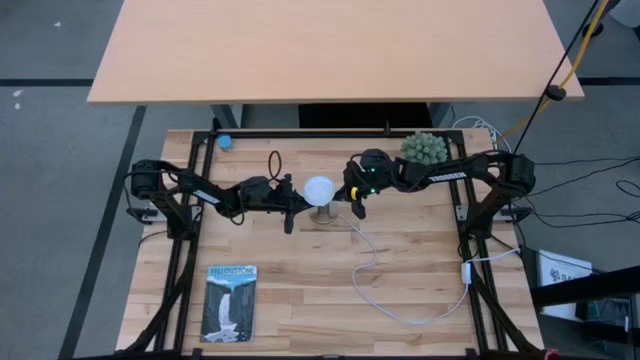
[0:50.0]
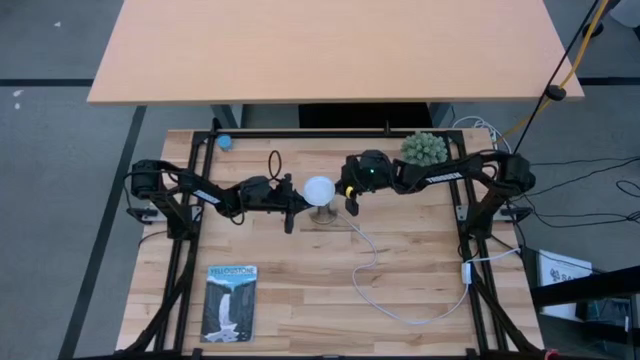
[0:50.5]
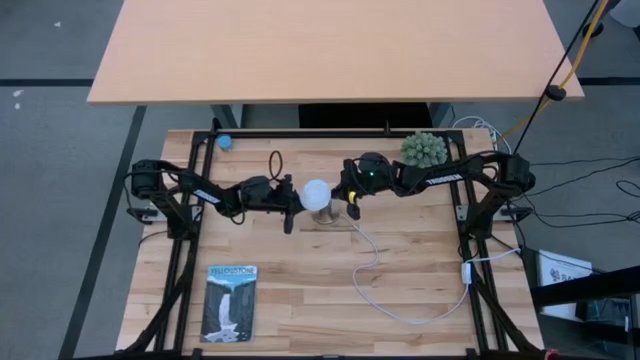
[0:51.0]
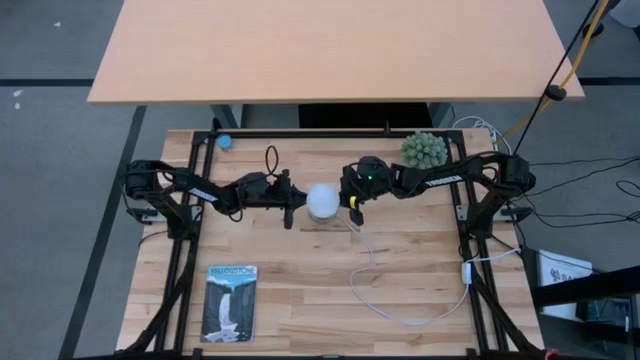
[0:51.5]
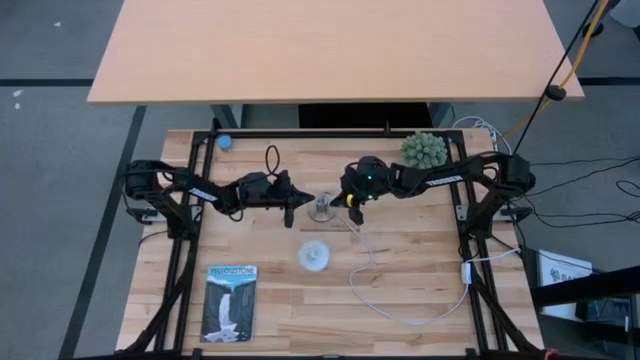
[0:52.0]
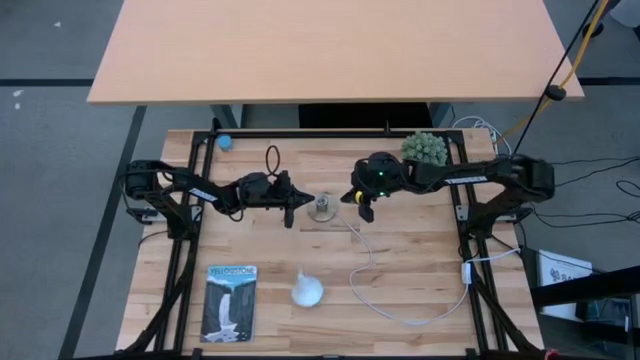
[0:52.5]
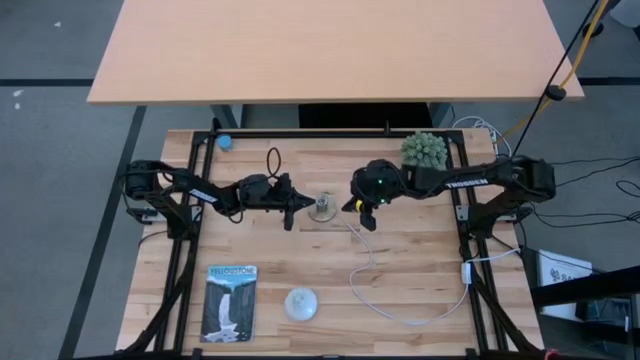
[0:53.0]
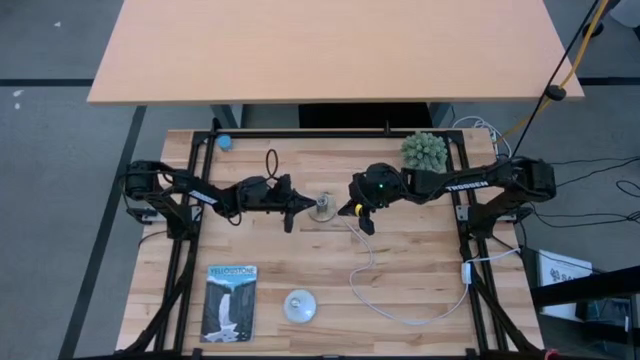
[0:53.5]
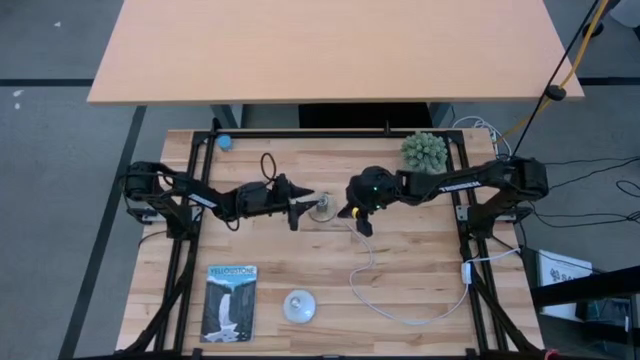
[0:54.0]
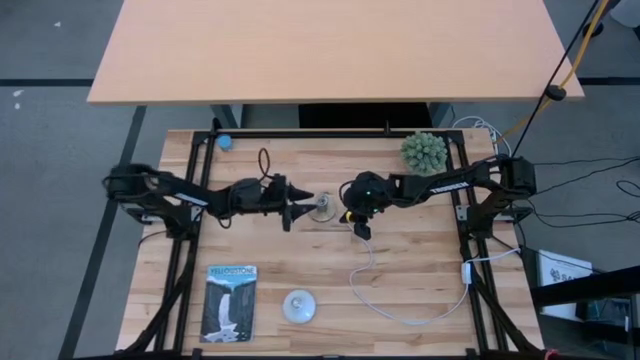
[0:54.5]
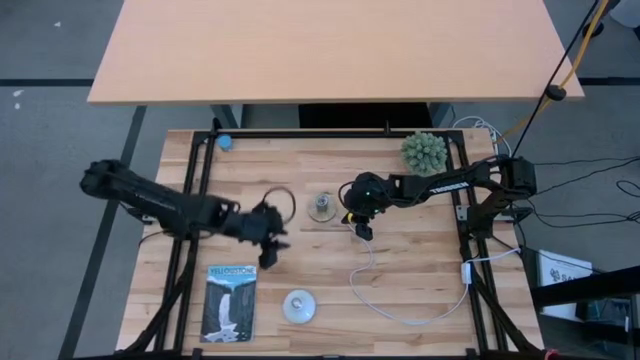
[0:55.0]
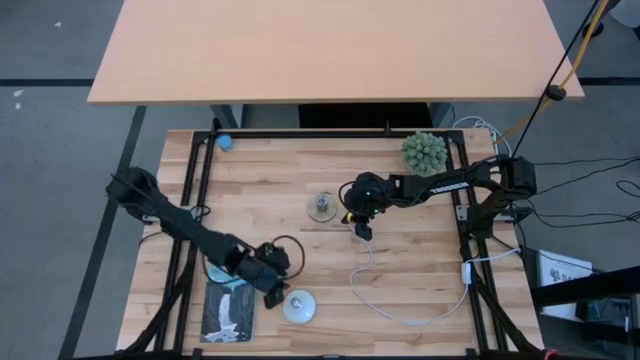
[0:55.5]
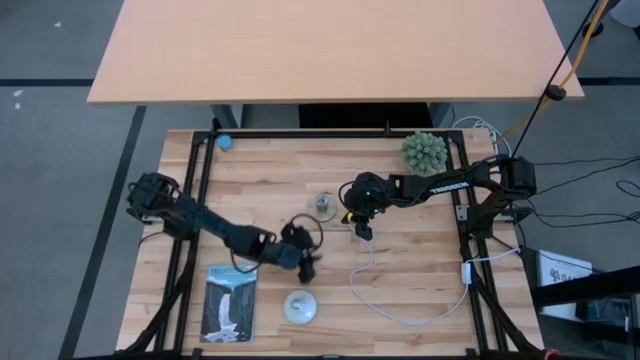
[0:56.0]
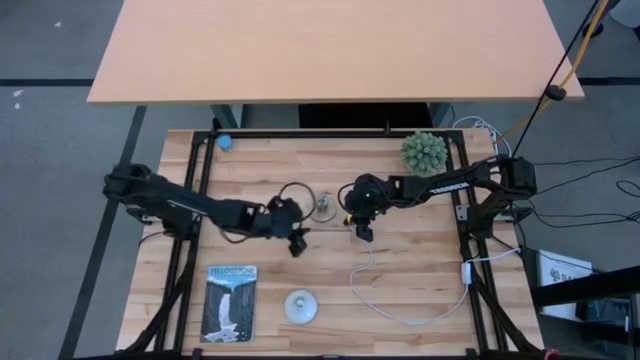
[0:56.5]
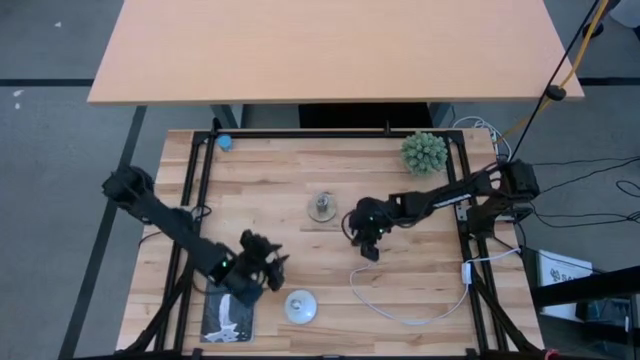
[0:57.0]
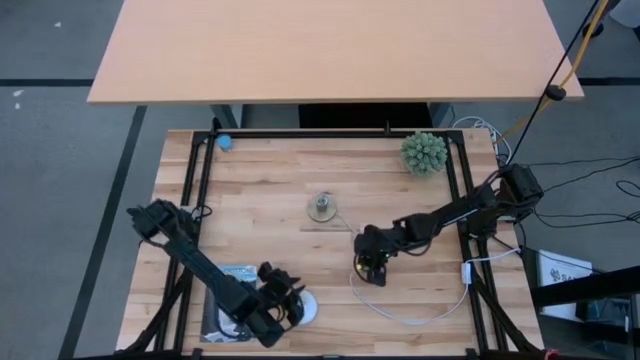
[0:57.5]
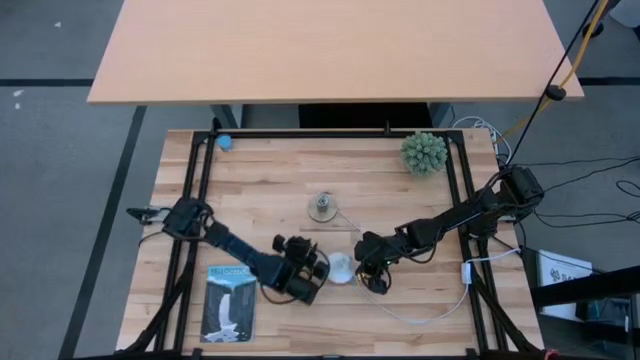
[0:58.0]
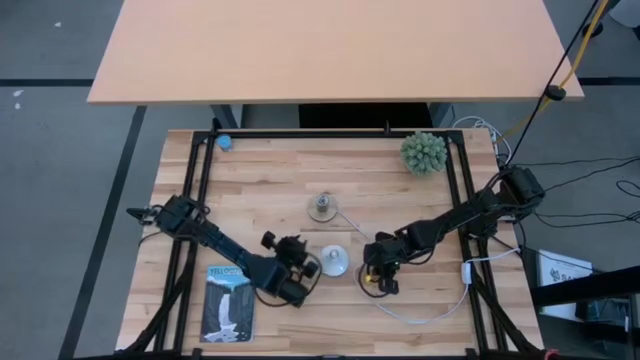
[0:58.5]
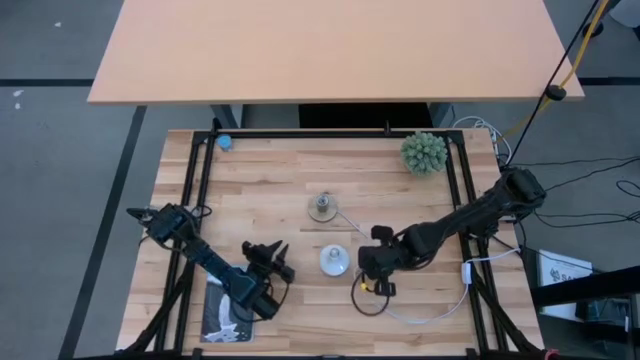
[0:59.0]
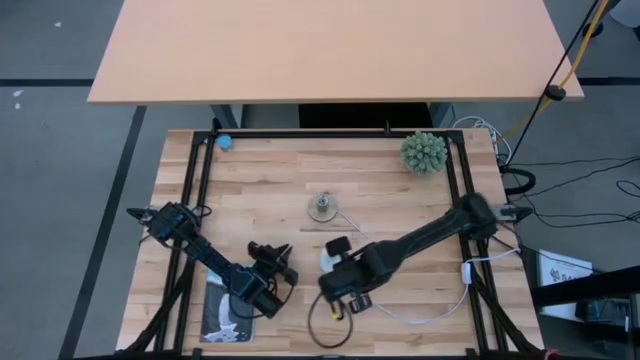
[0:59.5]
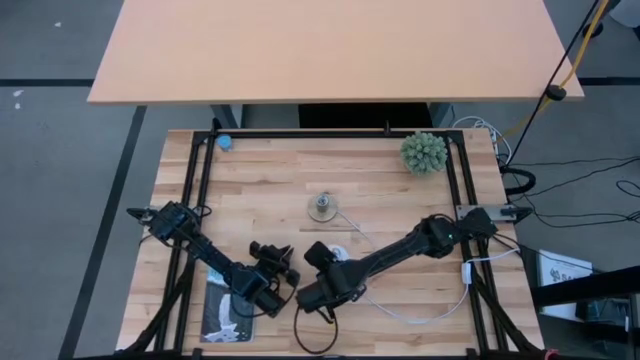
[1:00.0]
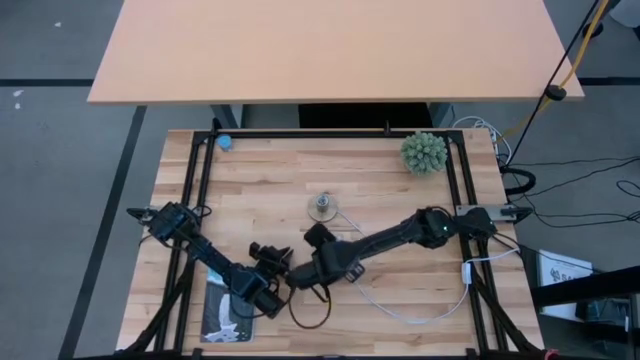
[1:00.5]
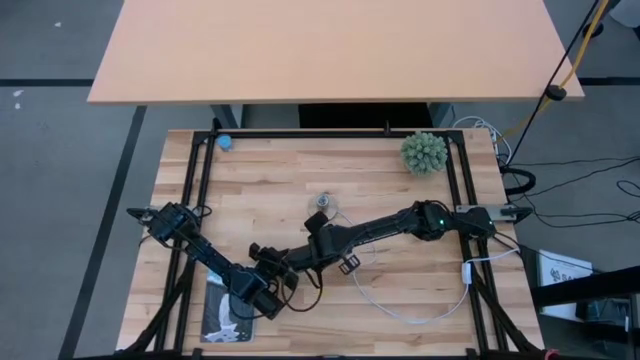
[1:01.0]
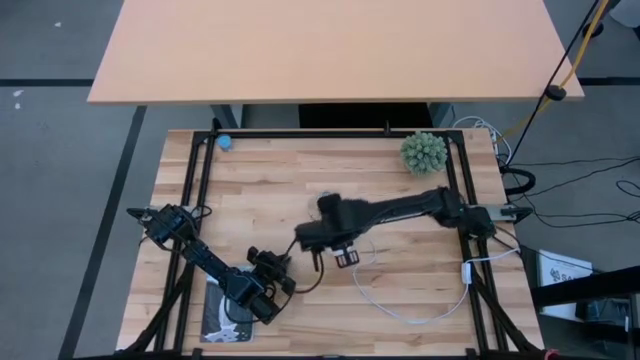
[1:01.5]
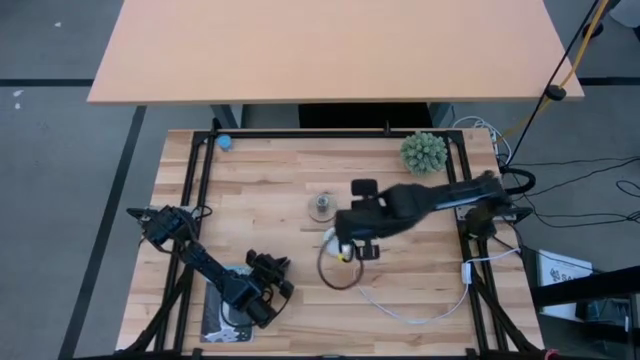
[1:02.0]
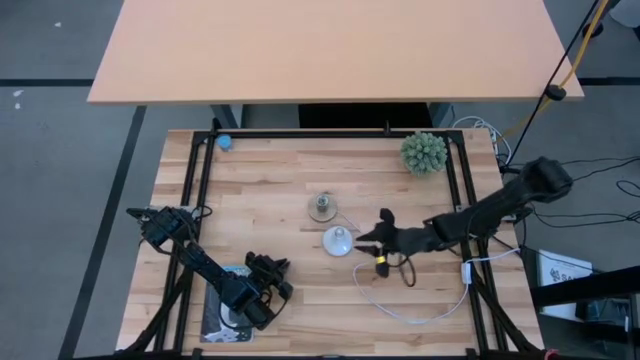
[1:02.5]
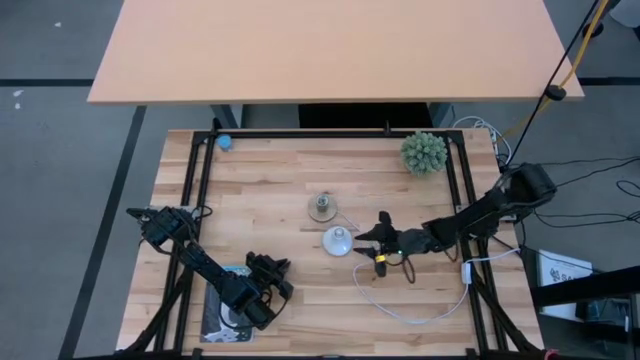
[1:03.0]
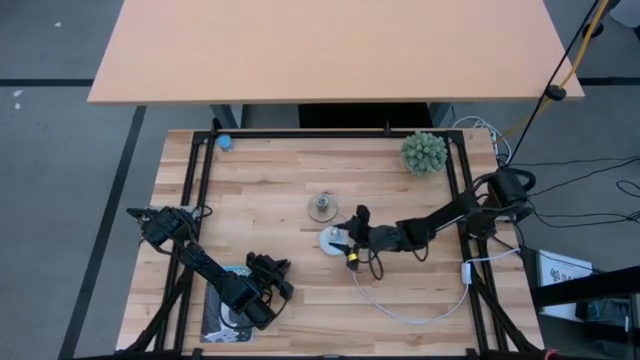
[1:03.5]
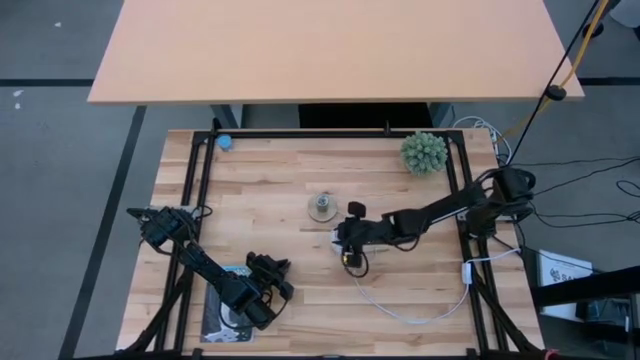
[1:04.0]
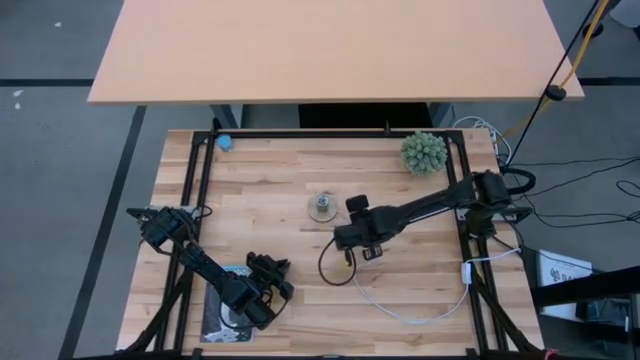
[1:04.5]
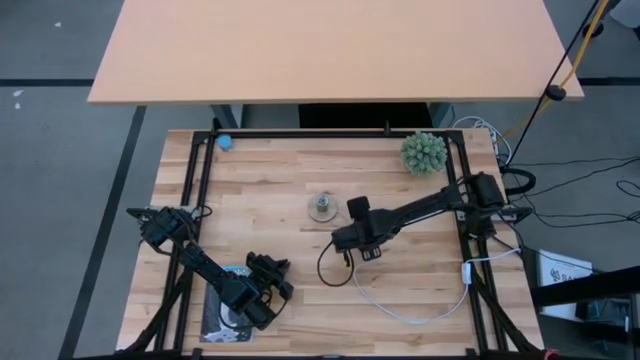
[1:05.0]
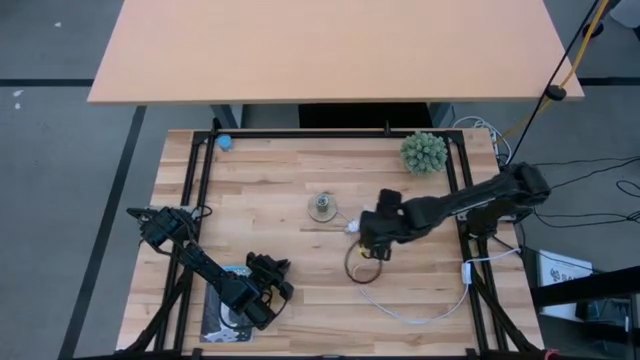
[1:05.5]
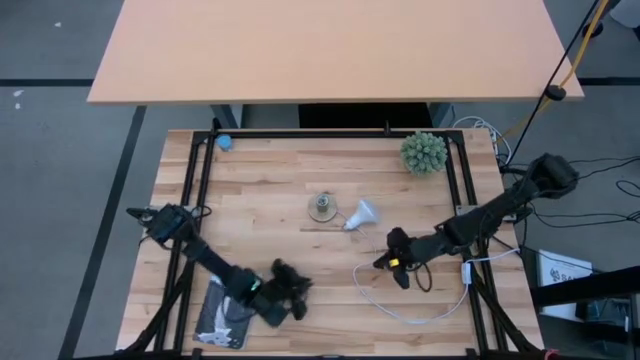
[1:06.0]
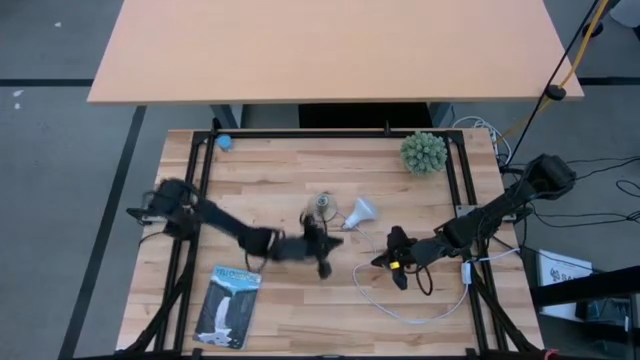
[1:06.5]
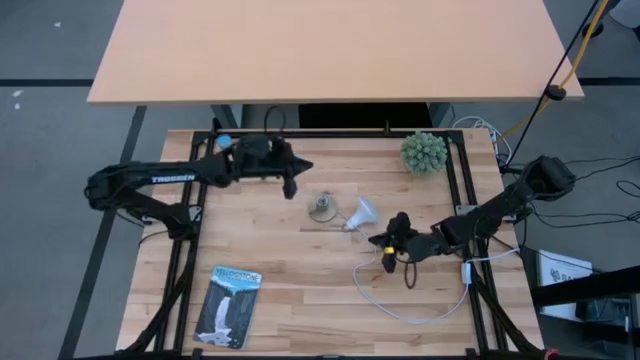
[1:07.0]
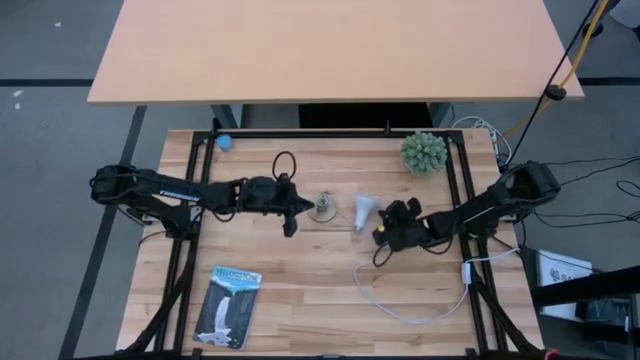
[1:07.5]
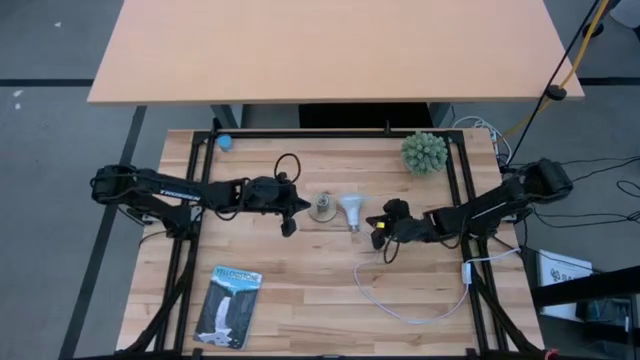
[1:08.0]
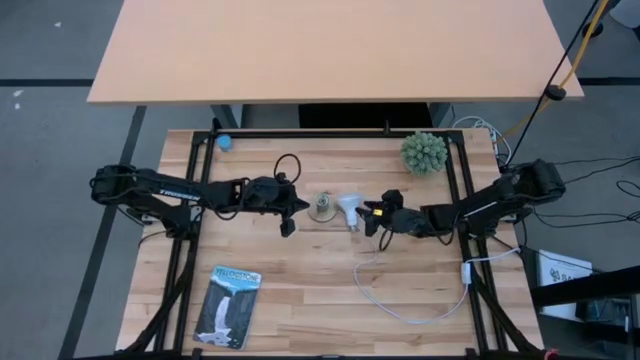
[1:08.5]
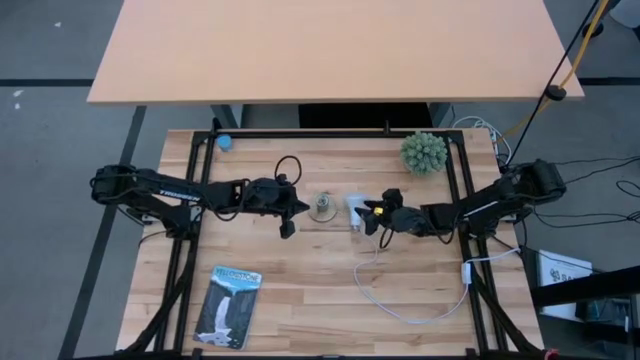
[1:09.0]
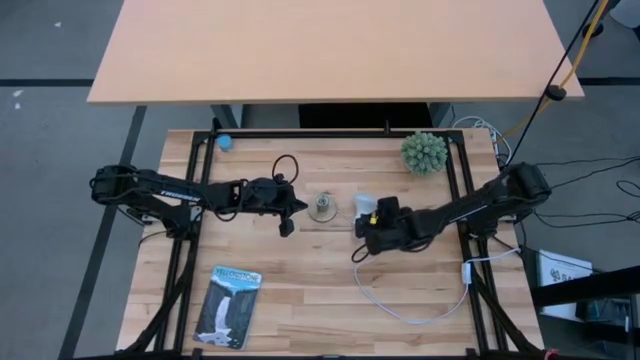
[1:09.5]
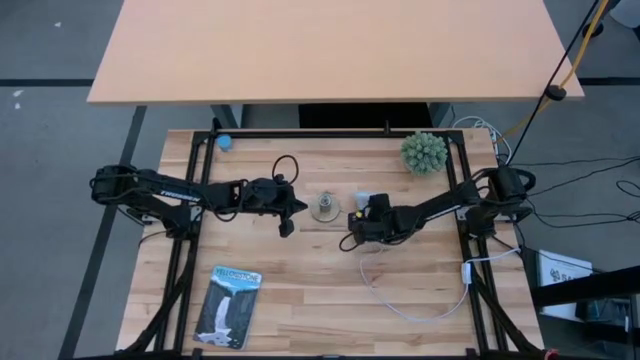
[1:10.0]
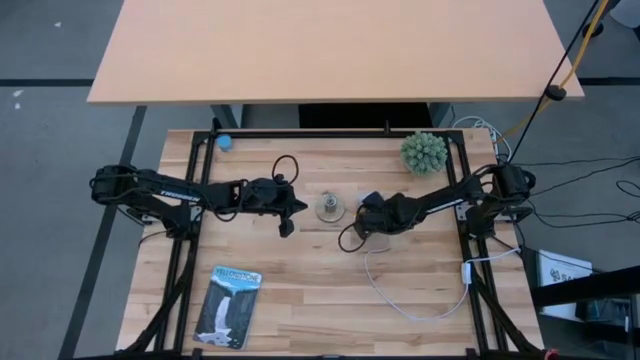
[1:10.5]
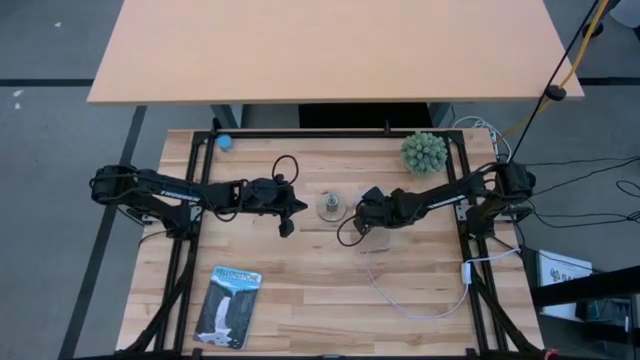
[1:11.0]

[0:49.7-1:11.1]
Task: Screw lightbulb
Insert the lightbulb into the lamp
